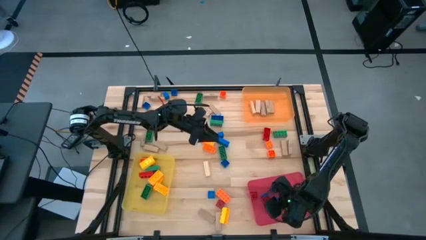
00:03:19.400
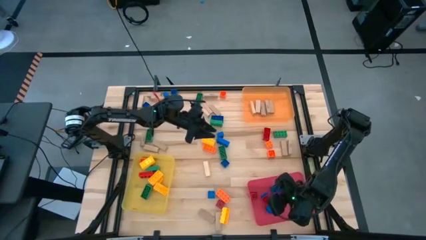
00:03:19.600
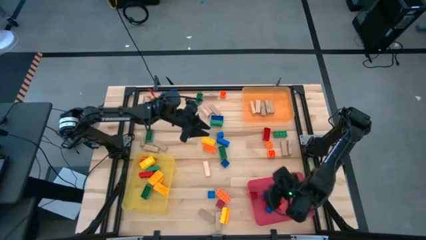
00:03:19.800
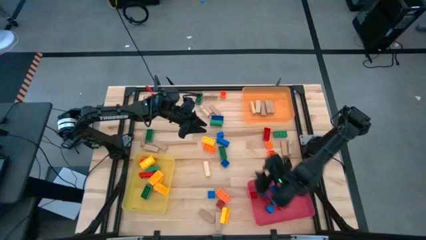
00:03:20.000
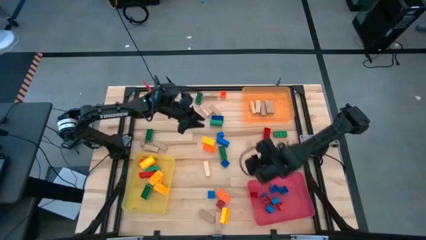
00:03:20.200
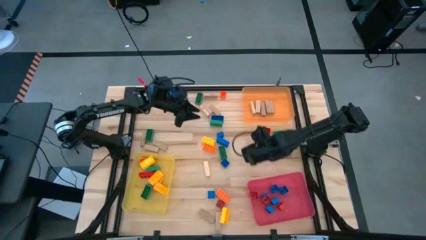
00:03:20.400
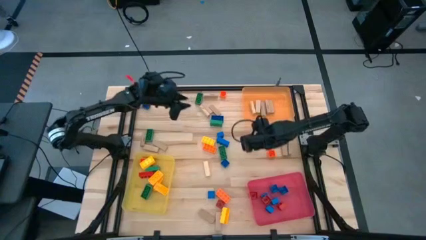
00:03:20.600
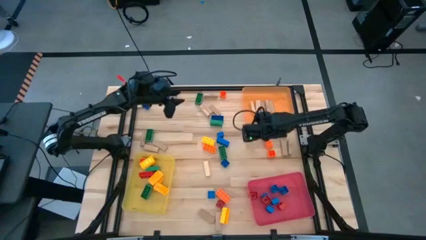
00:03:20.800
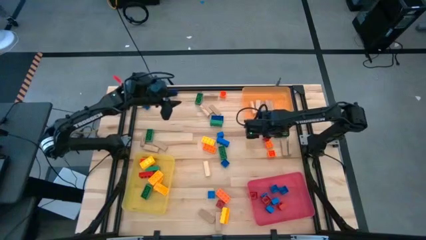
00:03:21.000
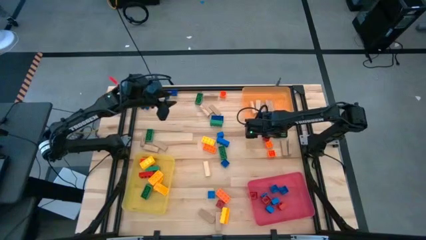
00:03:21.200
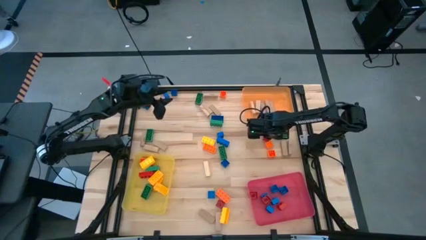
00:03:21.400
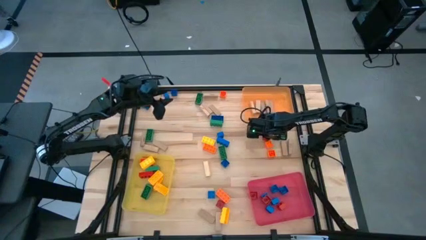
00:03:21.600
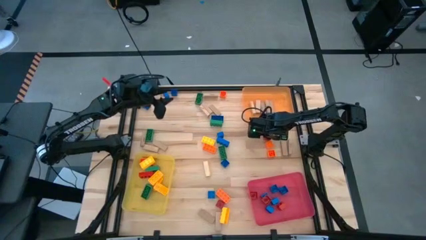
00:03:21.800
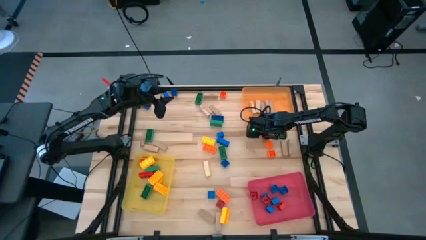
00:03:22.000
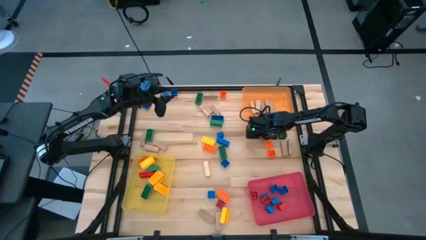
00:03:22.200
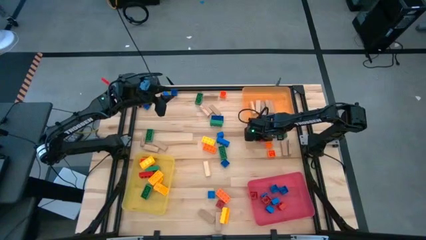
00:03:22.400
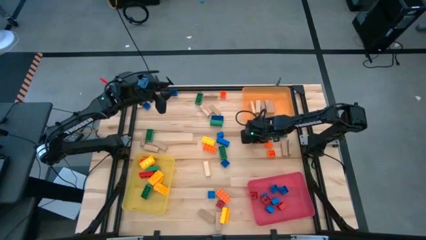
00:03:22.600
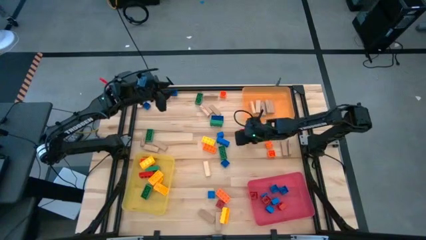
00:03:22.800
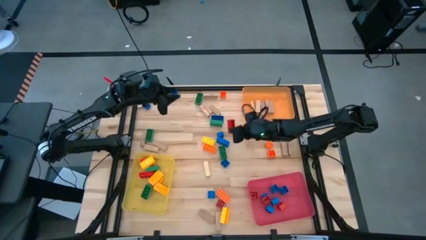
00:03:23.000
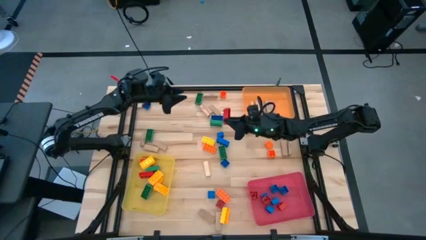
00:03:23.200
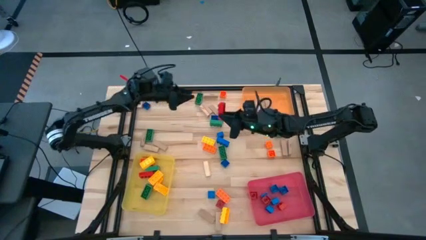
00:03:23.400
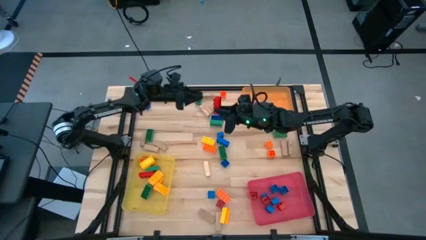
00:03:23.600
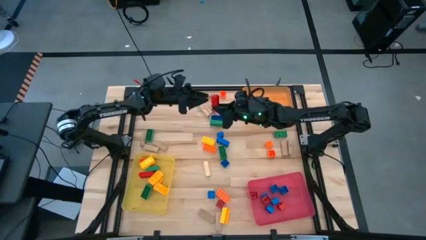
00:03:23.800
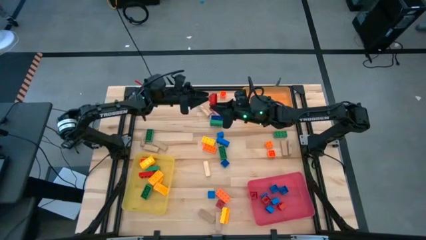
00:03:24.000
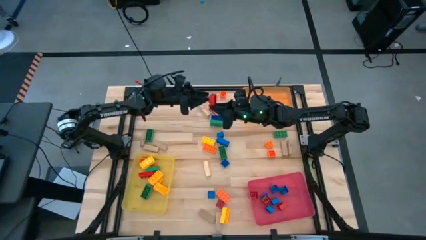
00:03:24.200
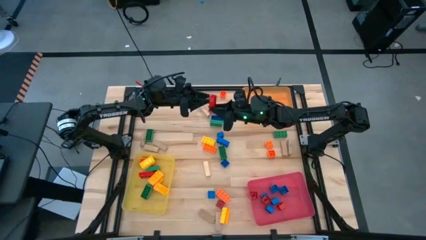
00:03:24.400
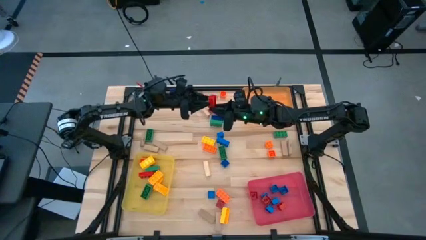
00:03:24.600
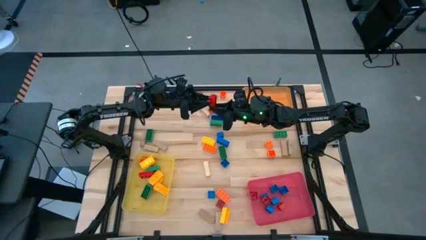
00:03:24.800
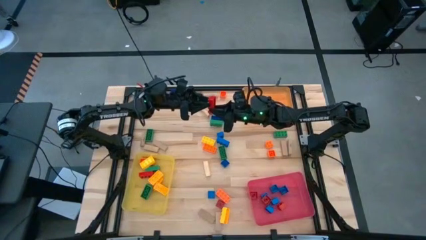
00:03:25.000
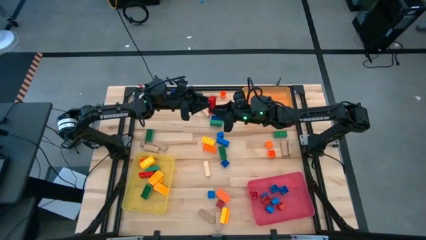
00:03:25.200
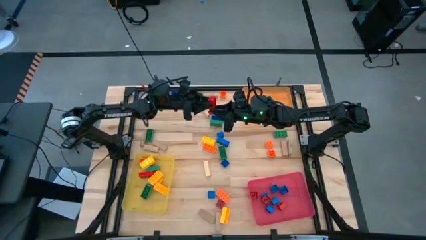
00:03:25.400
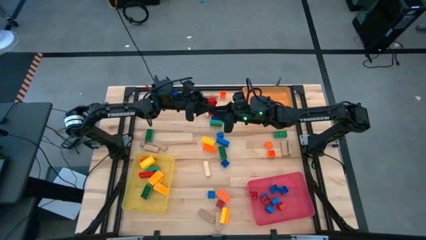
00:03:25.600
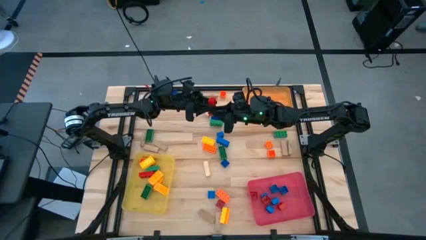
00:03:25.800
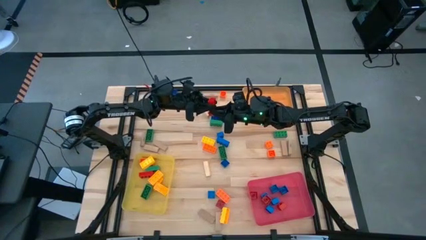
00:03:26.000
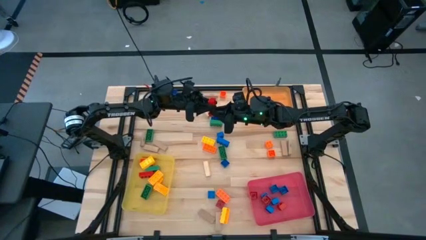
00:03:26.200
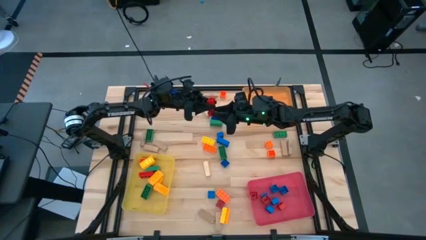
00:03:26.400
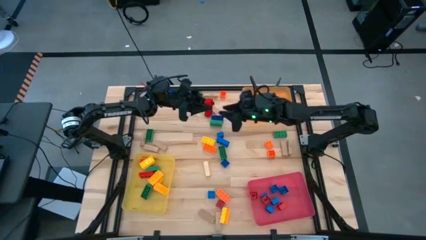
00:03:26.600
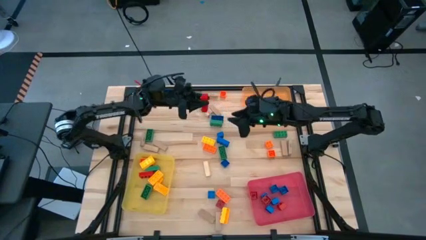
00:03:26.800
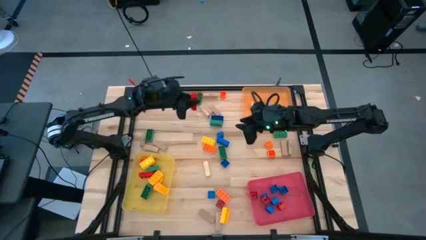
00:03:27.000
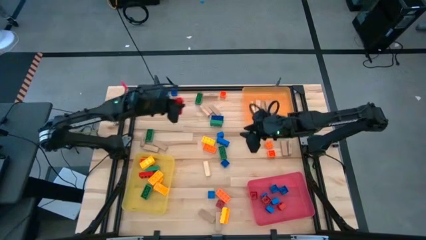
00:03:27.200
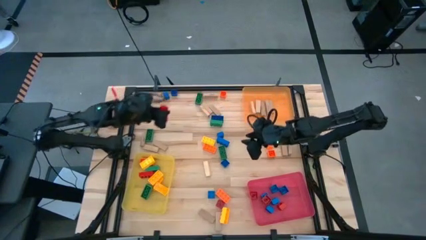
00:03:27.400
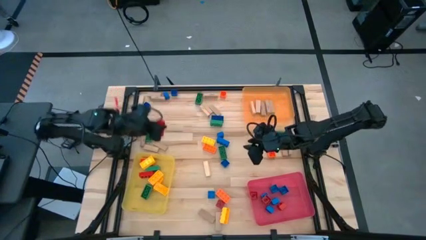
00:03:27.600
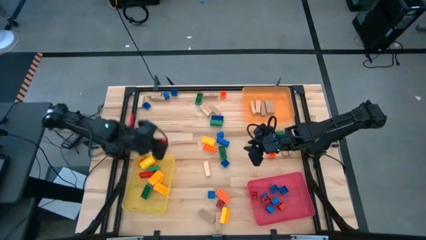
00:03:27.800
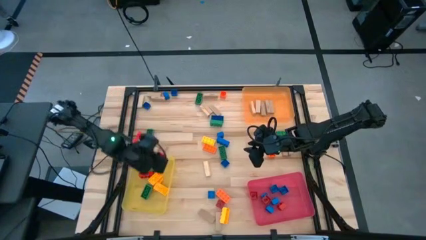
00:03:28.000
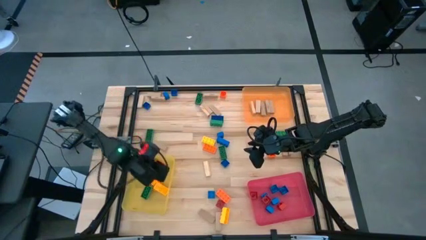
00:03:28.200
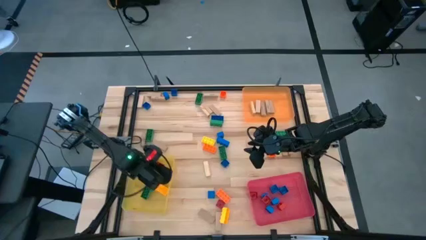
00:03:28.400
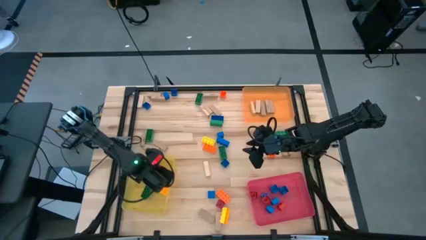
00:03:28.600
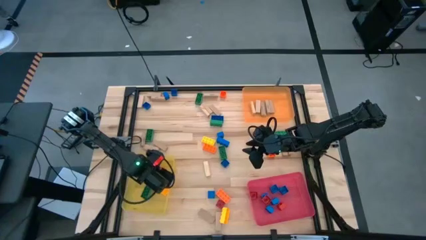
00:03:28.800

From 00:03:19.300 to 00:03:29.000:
Task: Sort blocks by size
Put the large red game piece into the yellow bin

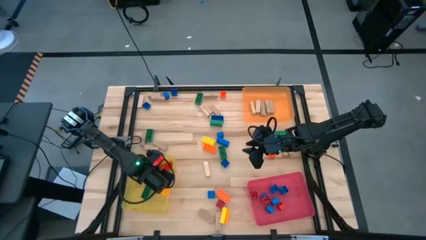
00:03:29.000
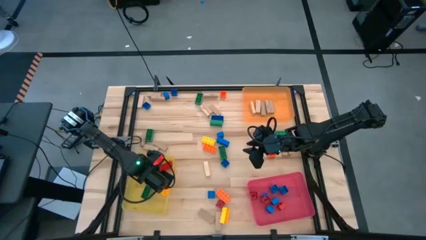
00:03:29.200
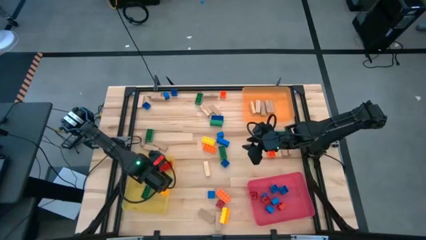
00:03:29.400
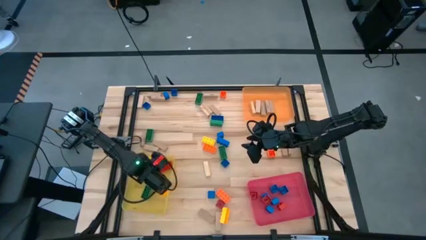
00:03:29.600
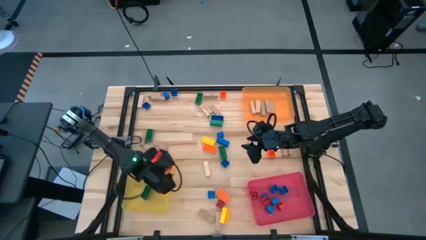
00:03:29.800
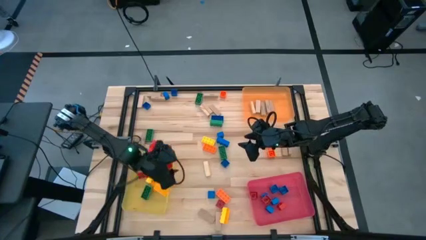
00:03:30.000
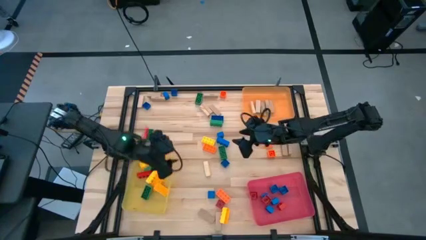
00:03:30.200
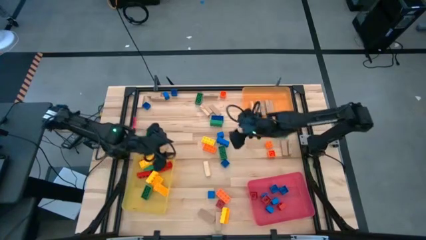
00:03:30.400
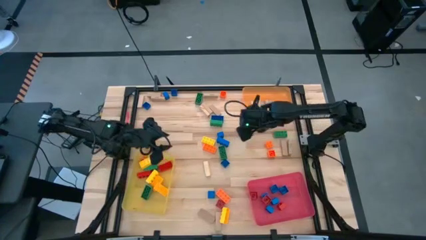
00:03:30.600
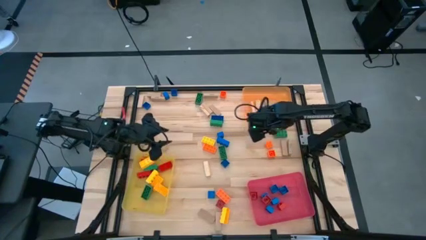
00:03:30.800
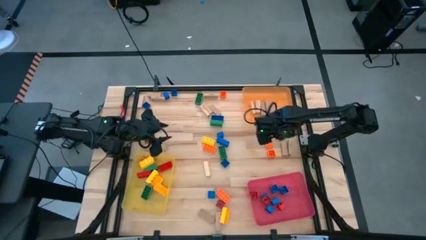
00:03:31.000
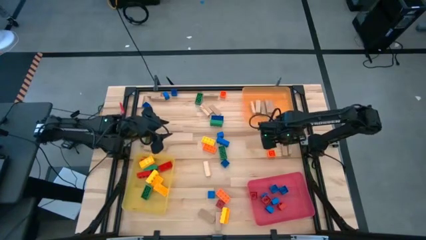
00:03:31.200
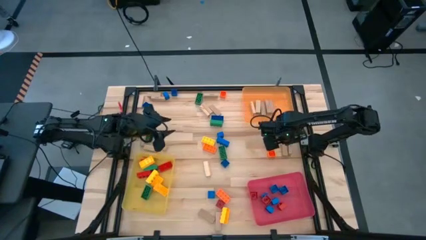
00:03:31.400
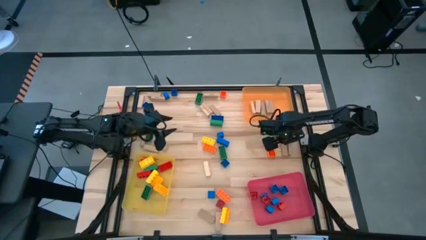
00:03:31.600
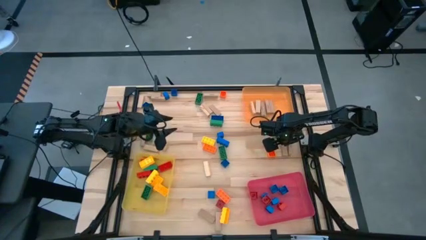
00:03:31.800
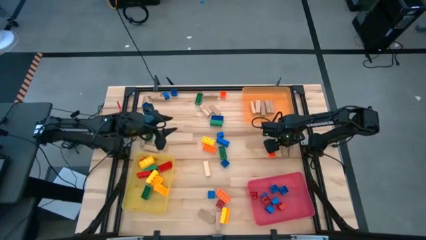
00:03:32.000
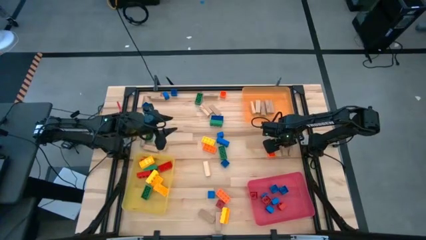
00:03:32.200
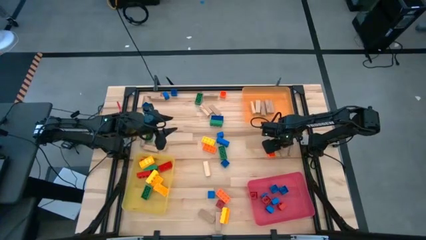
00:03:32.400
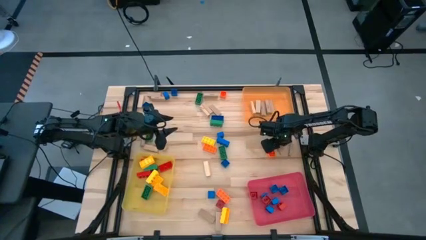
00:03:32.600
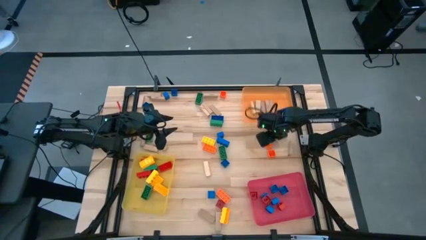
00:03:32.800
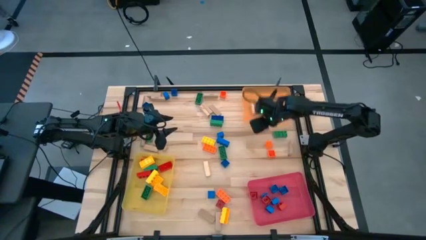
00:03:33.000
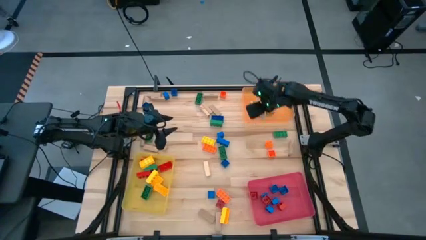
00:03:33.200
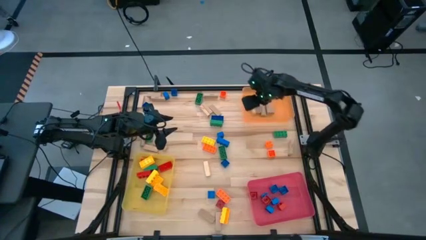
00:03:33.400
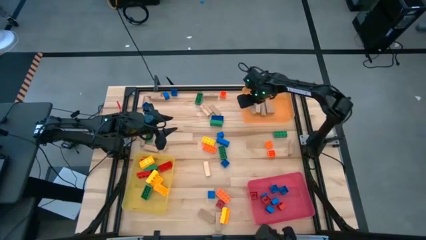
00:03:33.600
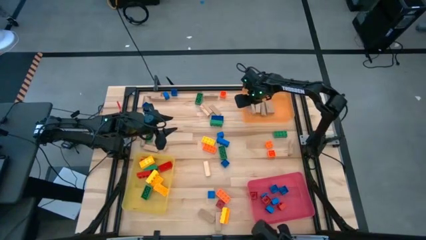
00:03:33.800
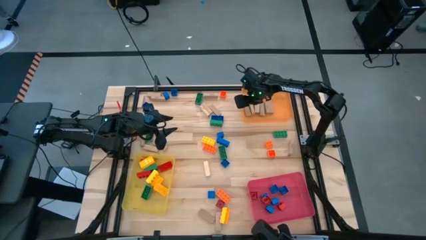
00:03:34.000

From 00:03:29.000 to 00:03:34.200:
Put the brown block into the orange bin
